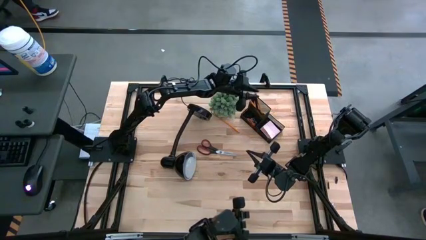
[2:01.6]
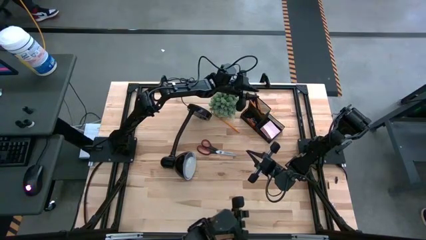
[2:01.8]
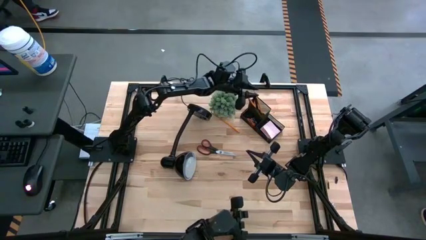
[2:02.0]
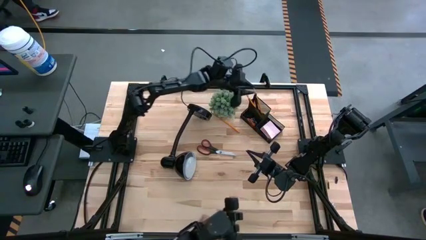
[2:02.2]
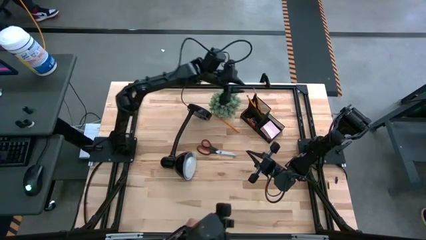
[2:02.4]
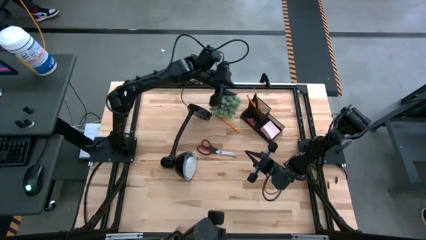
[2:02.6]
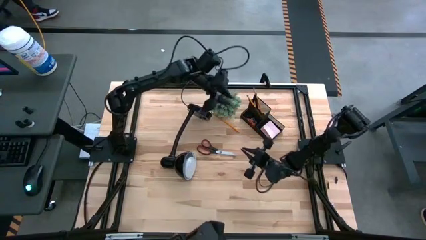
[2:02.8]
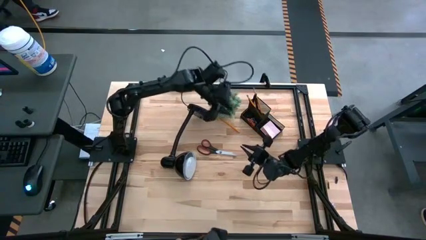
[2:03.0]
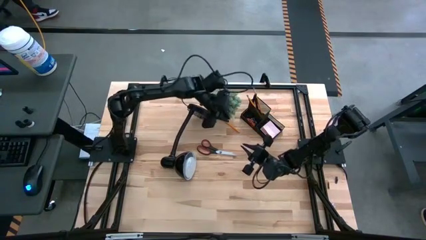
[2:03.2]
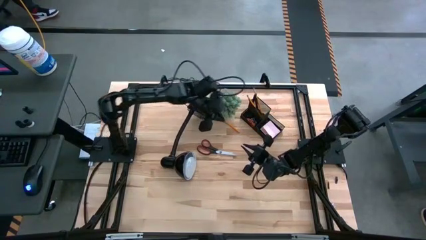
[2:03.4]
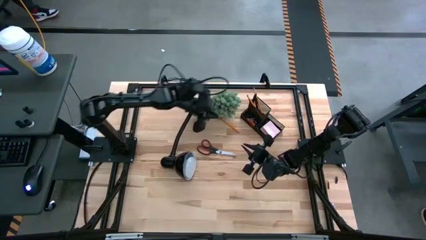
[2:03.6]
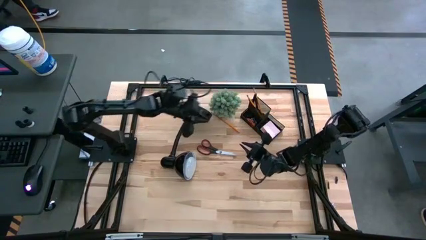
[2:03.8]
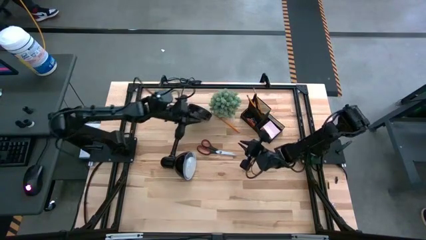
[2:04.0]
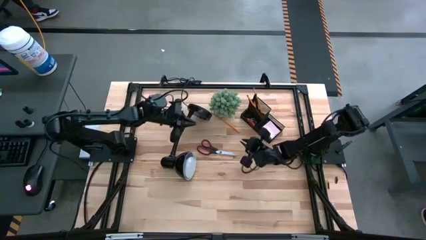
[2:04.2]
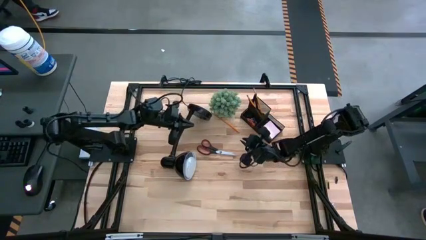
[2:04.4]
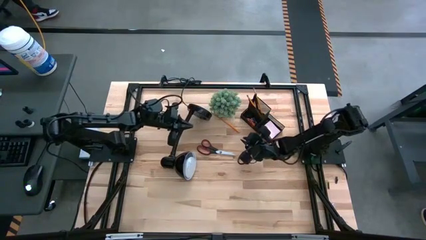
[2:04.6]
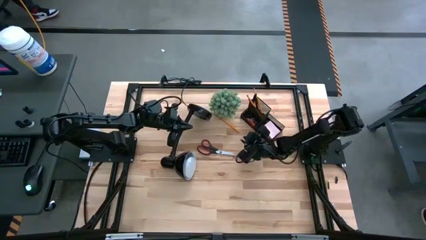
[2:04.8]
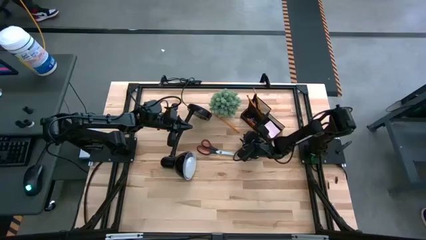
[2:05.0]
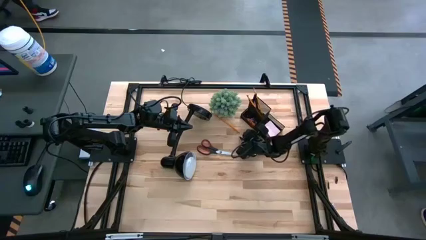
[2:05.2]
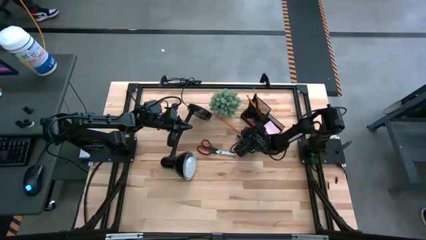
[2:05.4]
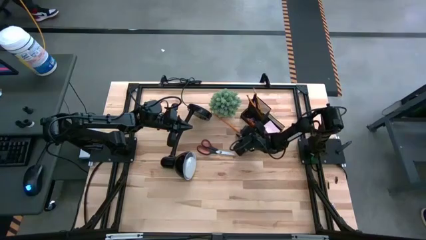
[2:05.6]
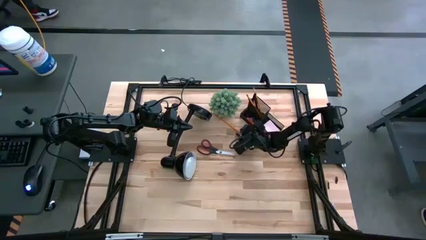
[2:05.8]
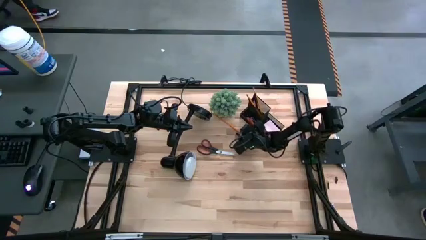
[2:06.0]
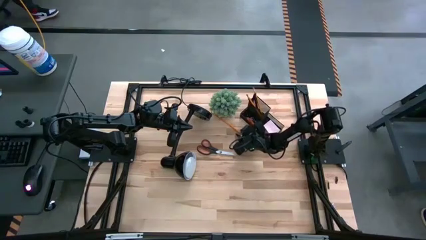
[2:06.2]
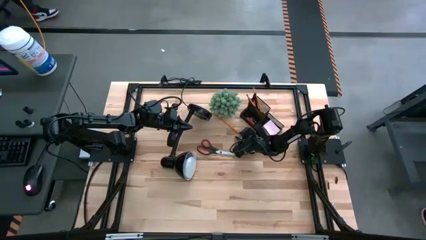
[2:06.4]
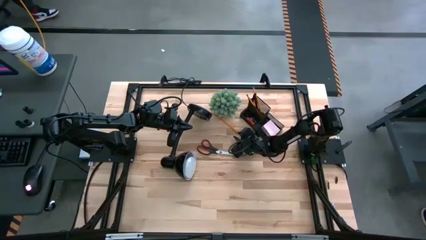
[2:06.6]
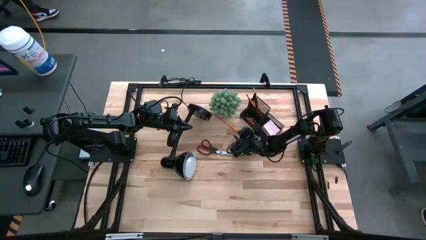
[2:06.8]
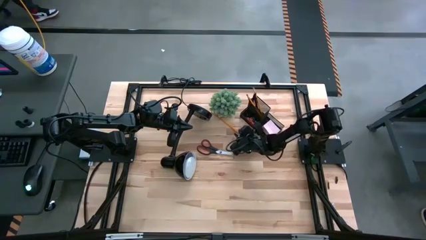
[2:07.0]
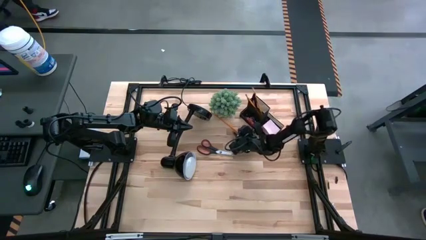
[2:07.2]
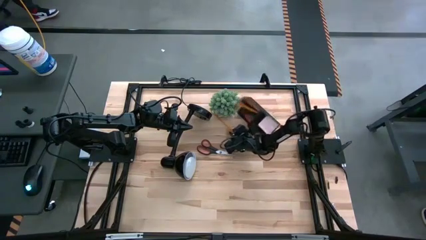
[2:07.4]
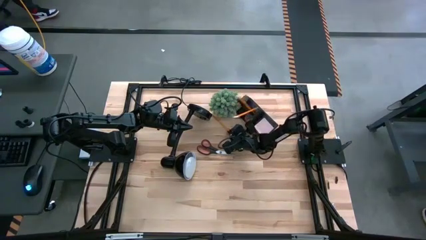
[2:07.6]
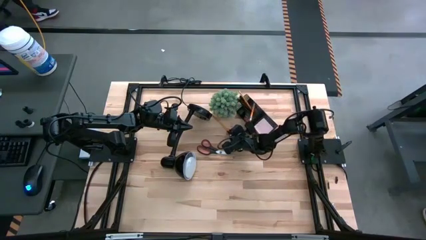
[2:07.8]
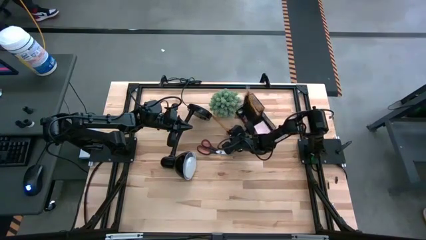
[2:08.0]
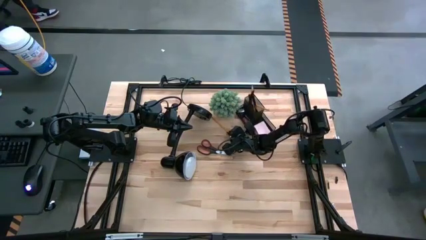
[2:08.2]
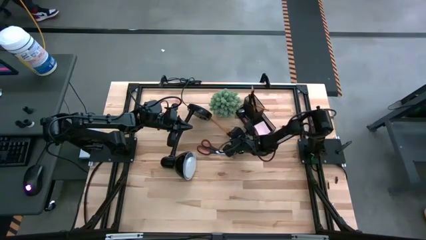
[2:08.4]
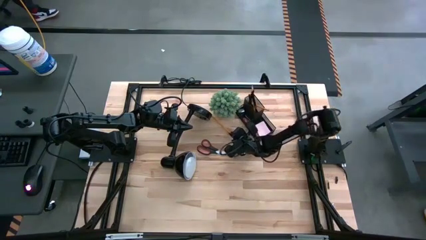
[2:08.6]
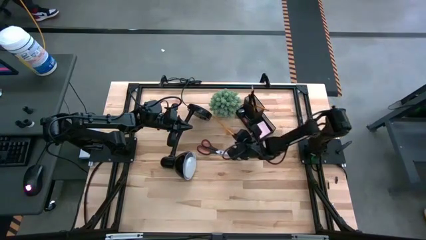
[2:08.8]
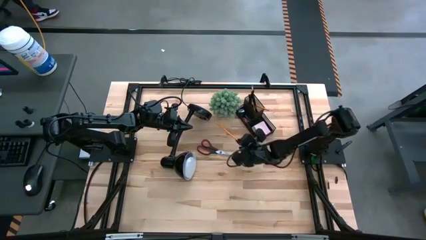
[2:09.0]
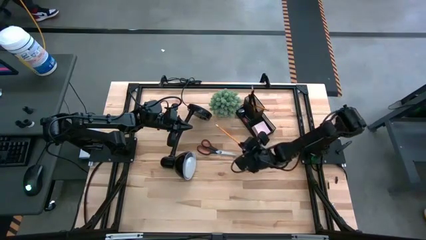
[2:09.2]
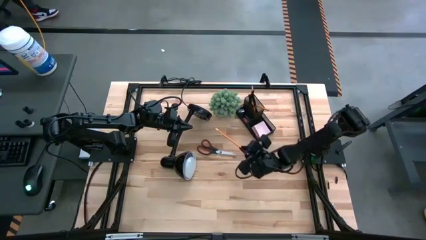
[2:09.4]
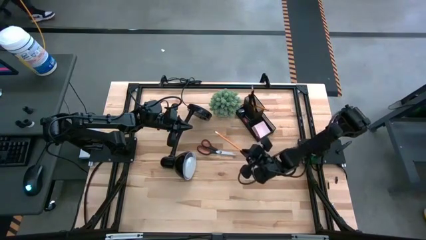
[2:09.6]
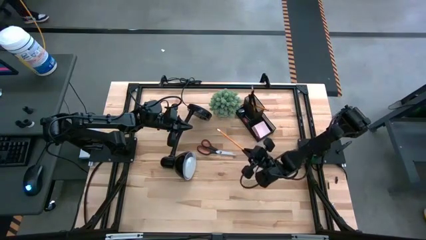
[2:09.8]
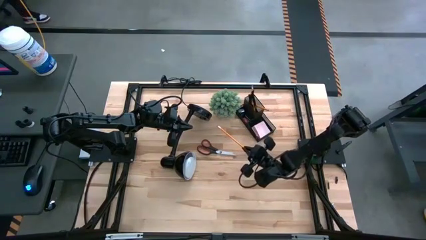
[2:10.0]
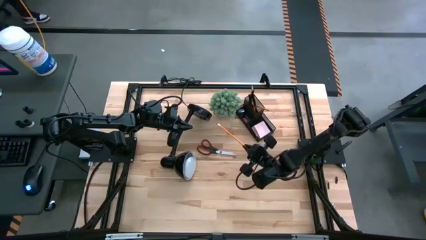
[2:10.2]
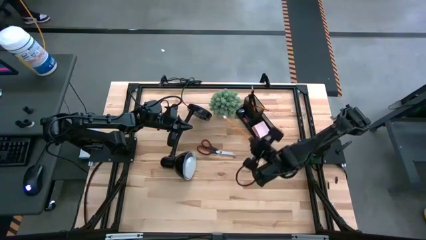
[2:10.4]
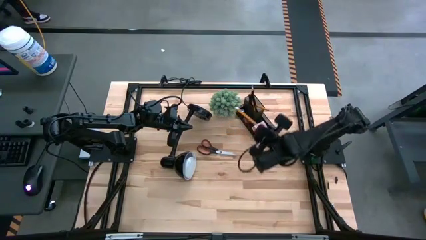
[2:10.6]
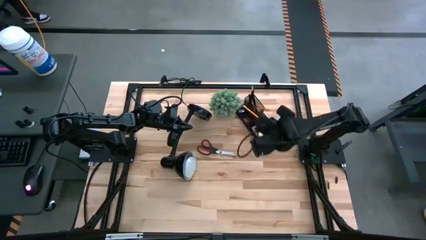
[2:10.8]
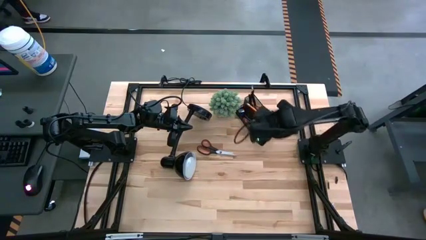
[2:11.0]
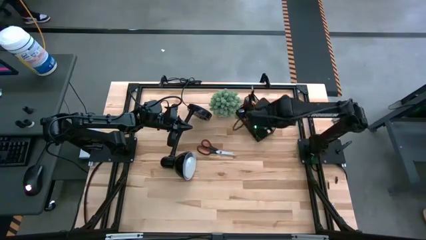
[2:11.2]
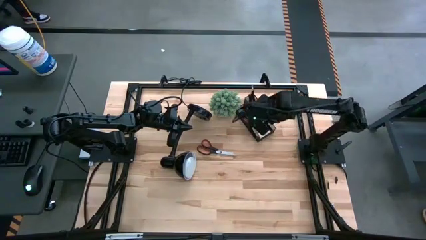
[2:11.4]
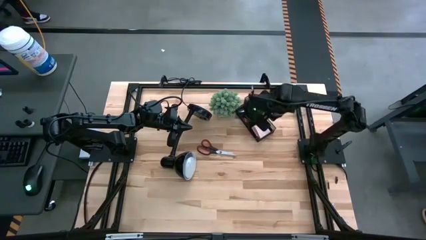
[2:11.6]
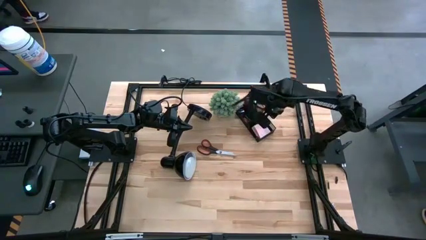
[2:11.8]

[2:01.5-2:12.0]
Task: Pick and place office supplies into organizer
Put the pencil into the top left section of the desk organizer

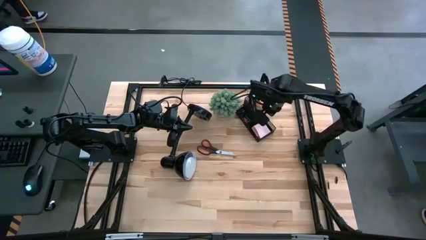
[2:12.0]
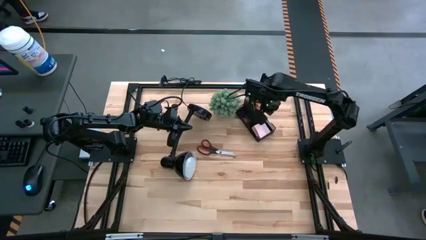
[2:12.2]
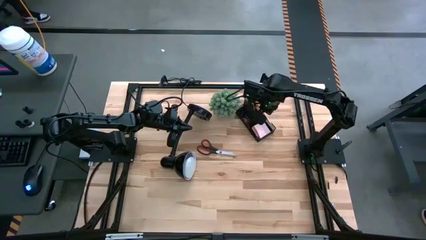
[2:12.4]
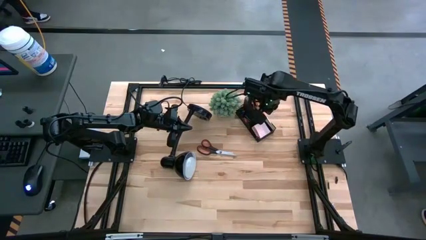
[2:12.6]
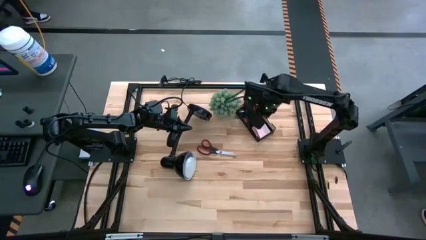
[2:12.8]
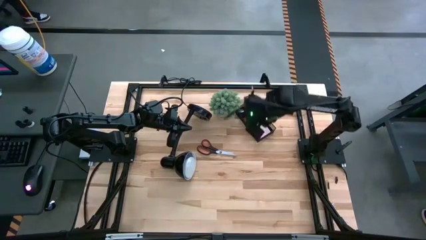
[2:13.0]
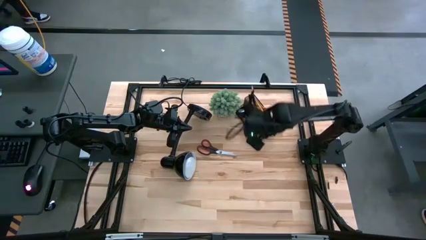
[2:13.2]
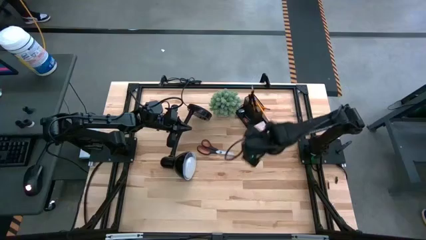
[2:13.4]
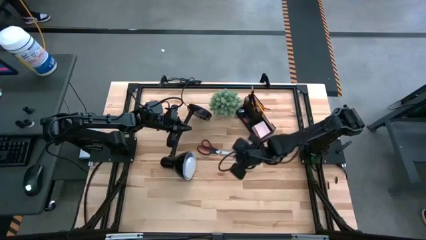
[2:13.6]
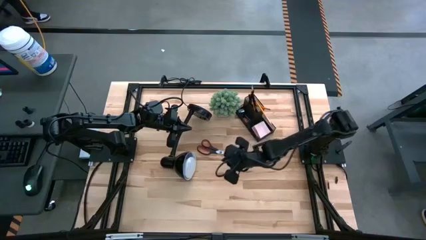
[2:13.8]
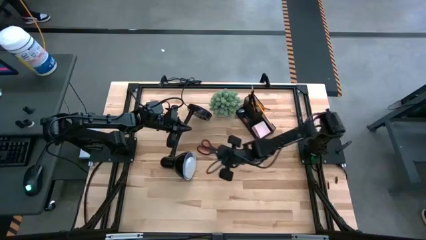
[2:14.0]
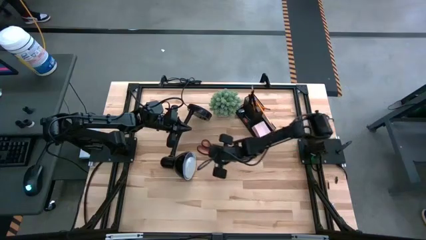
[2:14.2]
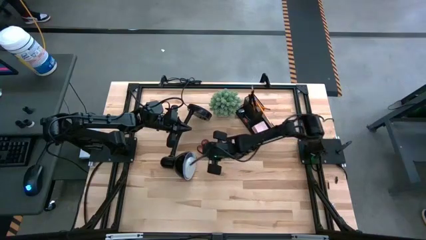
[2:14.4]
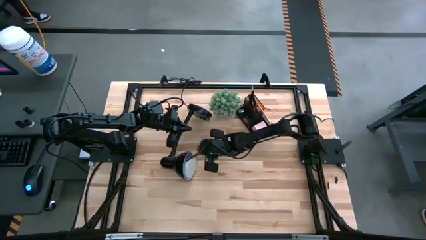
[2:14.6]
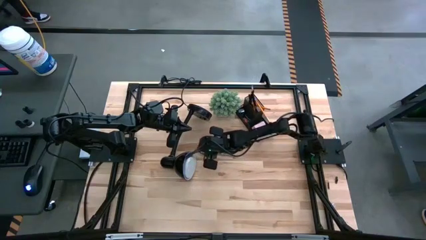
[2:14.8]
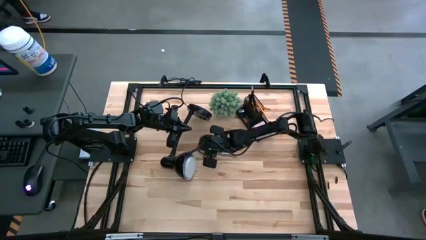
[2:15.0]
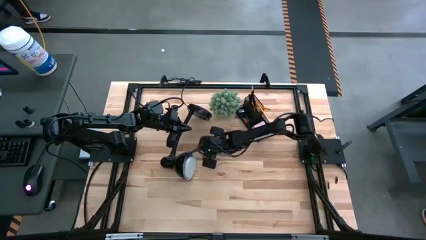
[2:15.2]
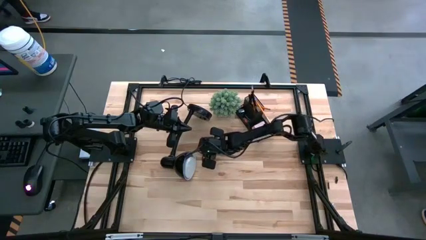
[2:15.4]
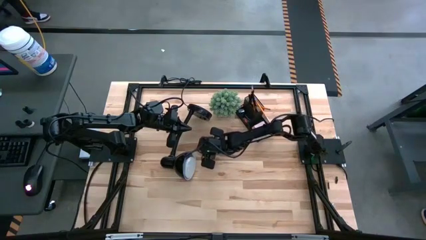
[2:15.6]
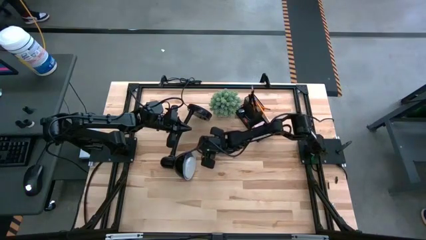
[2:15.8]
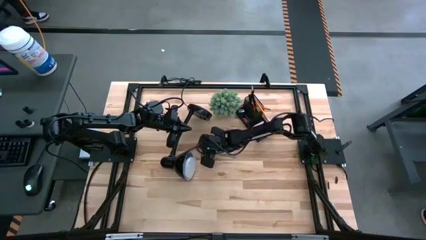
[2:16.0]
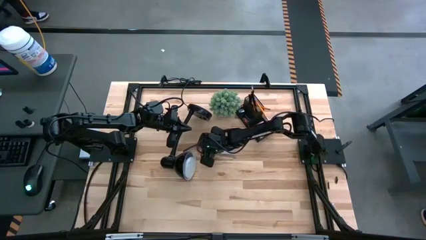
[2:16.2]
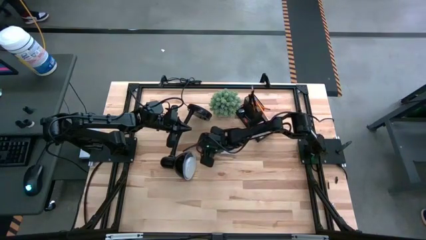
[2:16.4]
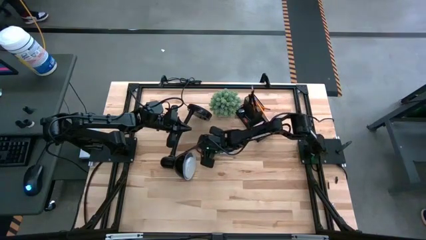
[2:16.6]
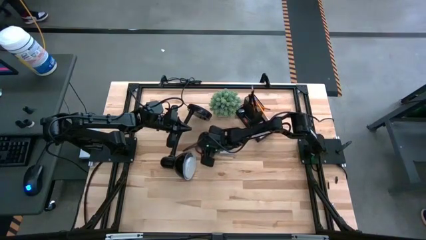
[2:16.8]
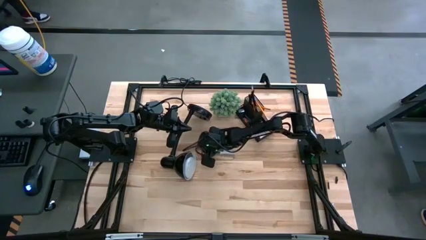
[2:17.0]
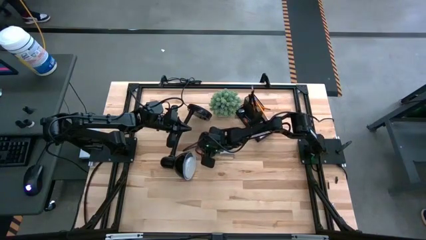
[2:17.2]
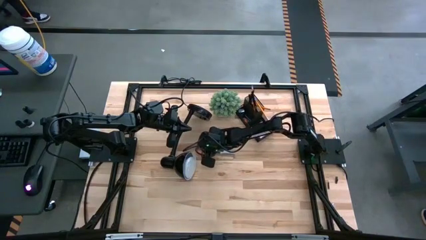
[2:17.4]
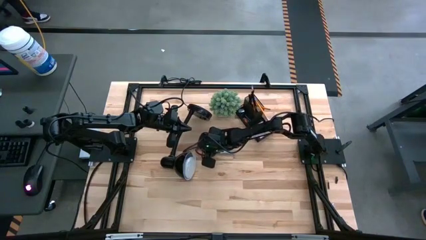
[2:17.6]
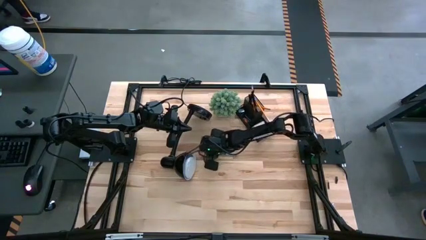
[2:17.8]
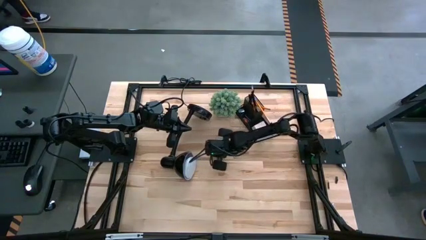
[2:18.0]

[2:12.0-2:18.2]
Put the scissors into the top left section of the desk organizer

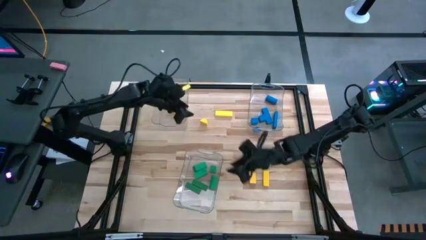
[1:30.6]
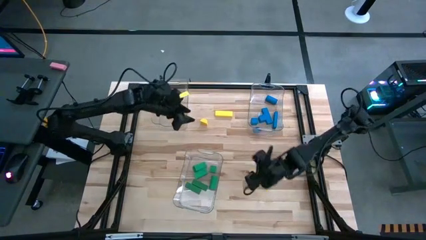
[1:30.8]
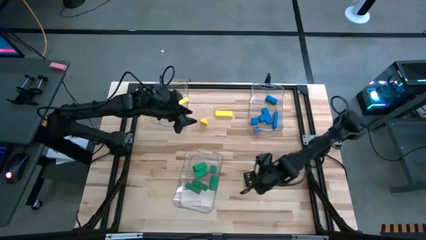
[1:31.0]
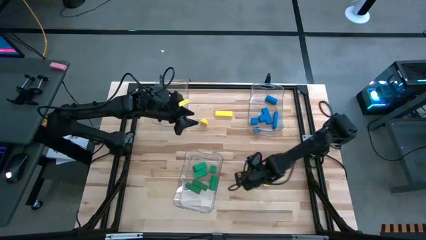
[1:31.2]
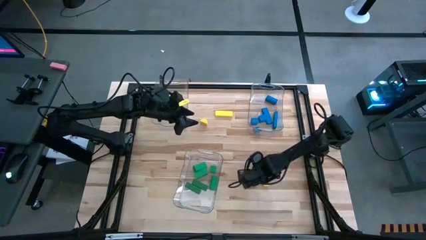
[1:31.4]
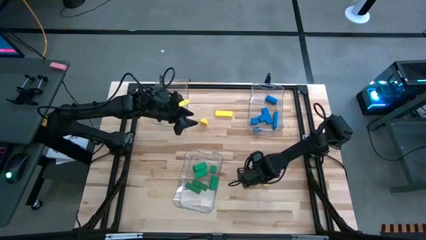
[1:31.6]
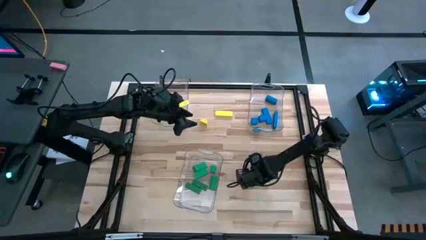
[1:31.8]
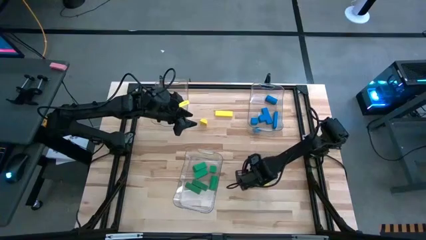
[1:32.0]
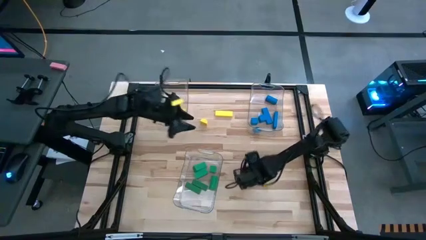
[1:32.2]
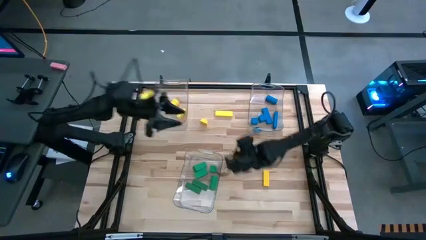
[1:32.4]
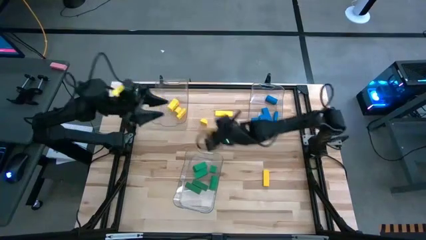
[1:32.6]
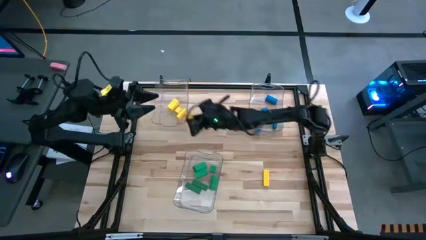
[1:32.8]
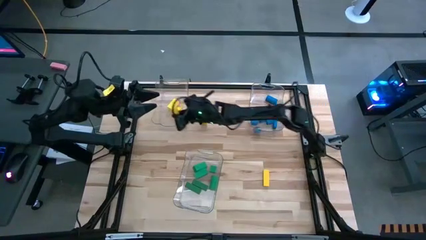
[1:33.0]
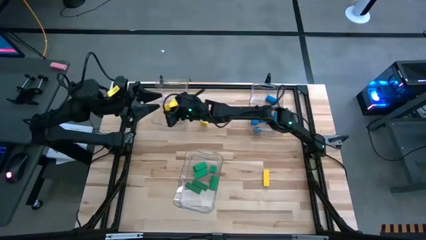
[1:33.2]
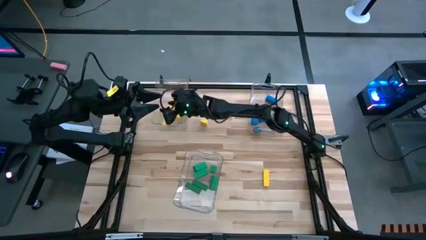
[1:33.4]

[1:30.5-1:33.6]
Task: Sort blocks
Put the yellow block into the top left transparent bin
